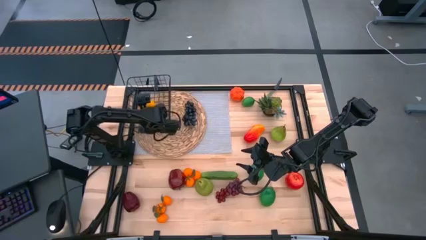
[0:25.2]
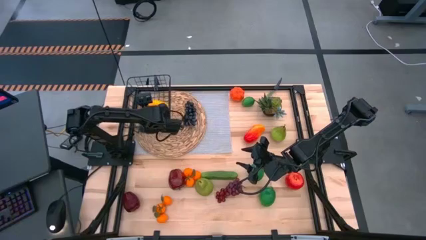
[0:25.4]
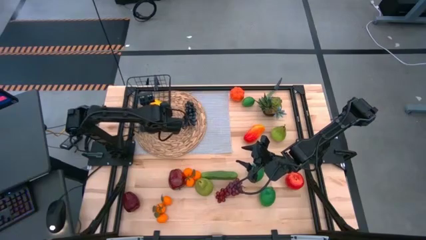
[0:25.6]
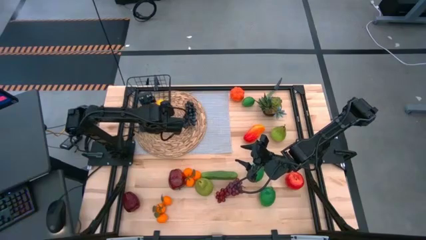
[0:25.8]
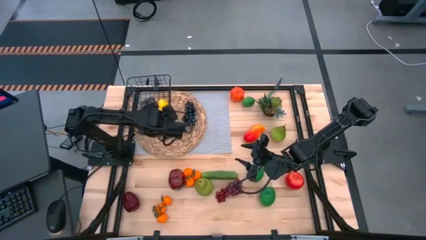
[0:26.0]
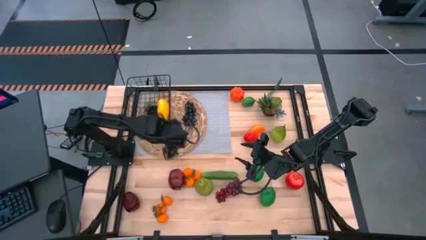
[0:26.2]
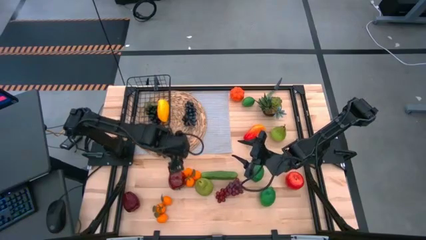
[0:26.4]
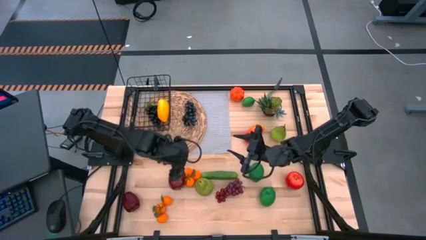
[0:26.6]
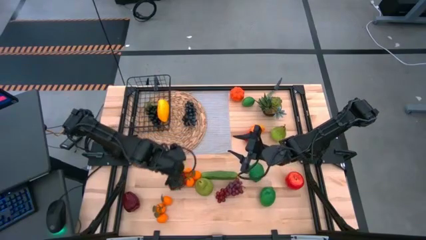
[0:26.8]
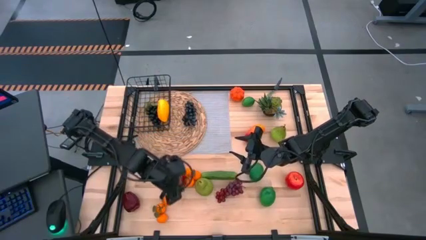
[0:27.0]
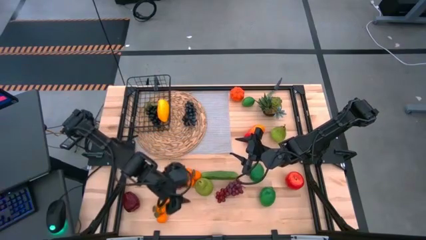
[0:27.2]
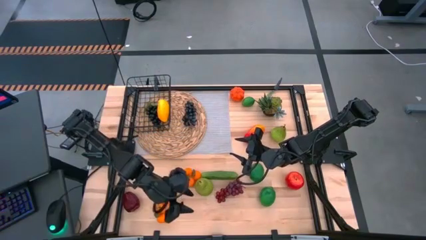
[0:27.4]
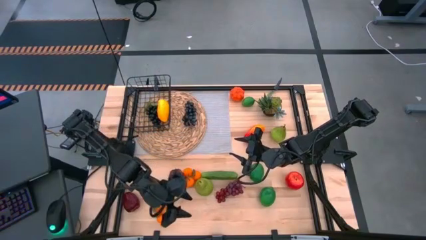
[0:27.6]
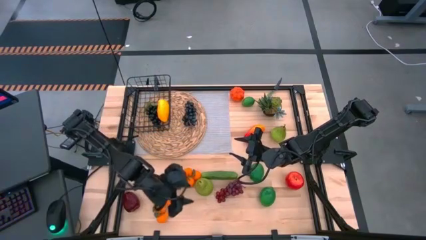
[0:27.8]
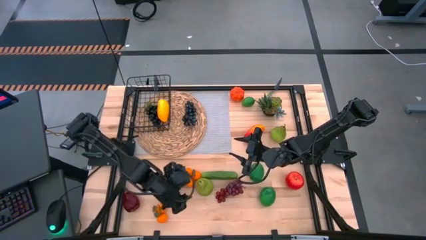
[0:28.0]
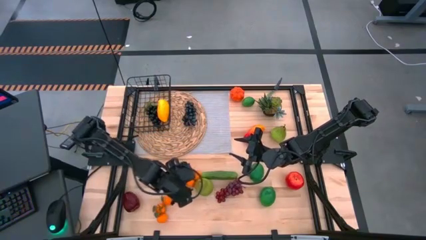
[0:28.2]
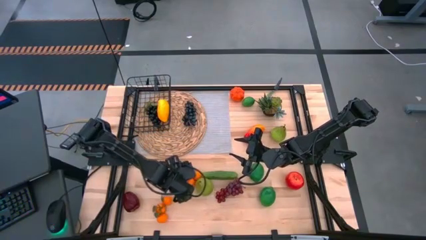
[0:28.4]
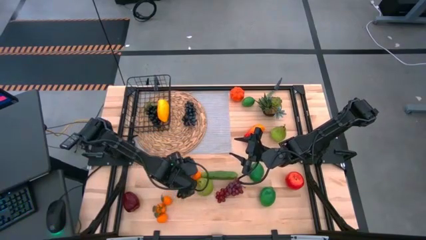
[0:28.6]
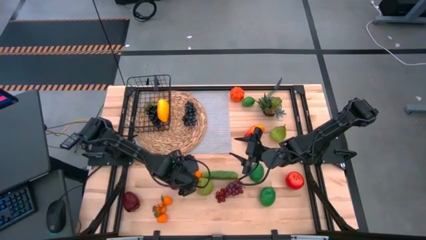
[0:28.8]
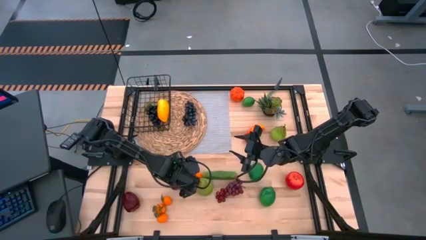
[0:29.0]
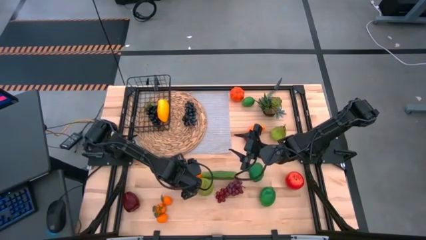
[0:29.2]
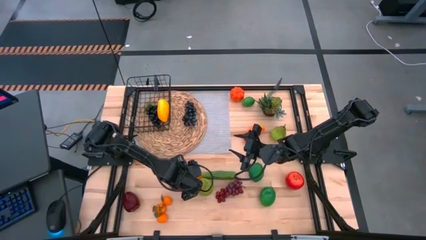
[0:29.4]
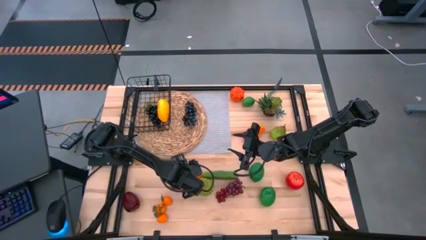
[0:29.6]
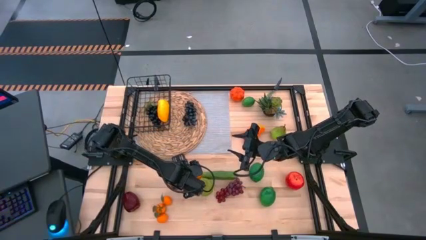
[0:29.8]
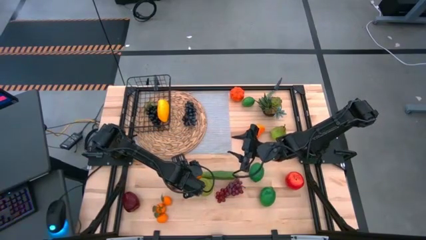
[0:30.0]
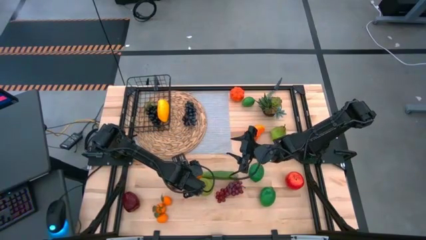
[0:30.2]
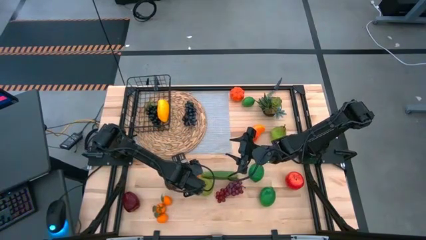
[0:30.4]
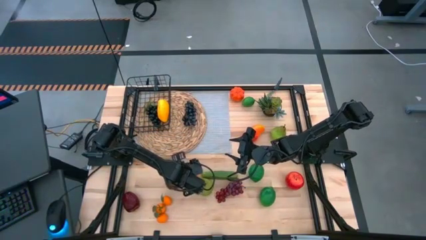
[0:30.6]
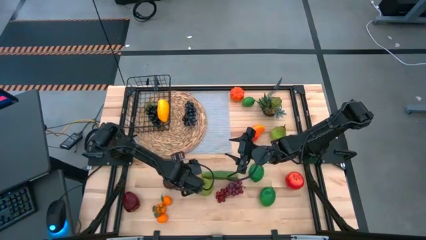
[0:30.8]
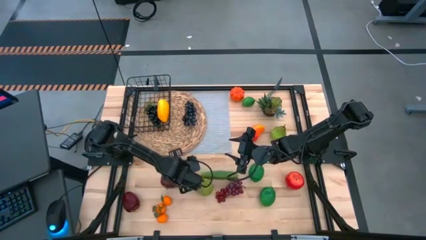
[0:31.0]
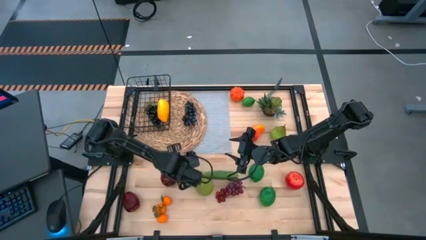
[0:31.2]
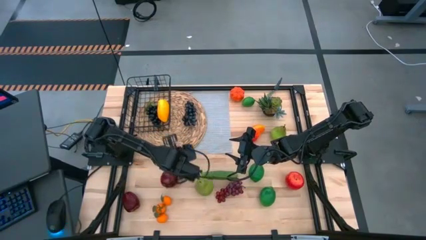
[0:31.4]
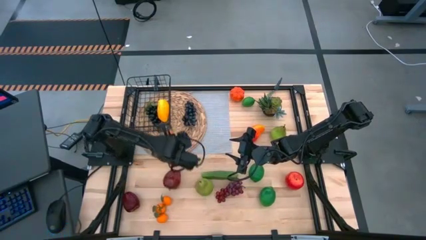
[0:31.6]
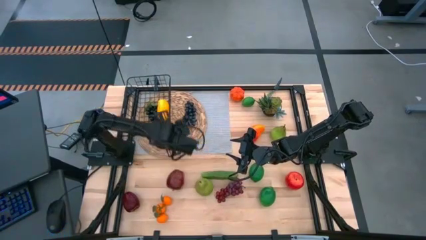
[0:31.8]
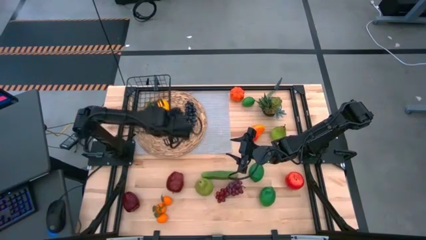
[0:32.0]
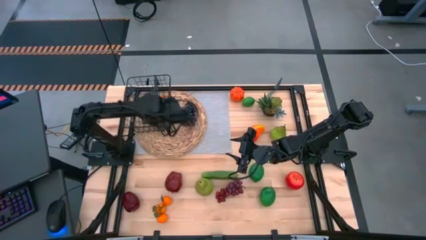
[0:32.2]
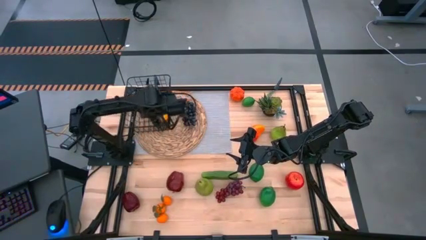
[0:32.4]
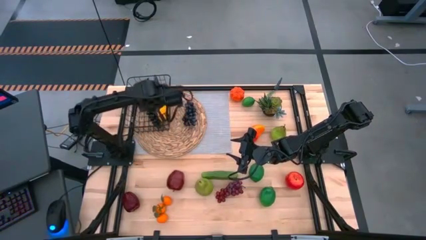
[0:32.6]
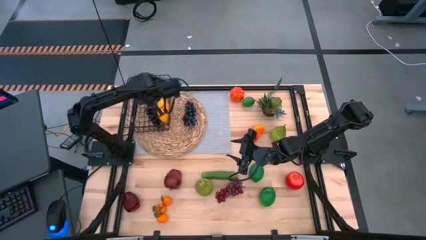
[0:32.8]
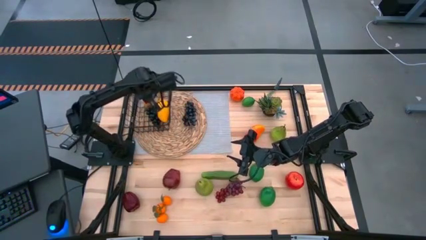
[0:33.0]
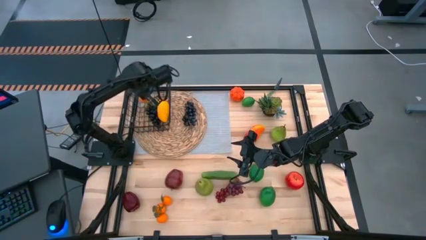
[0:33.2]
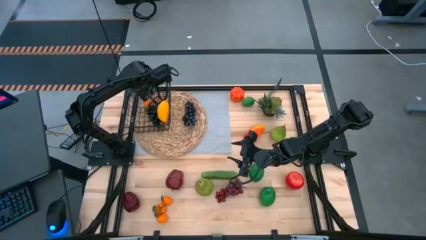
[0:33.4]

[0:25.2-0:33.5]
Task: Build produce basket
Put the top orange tangerine into the wire basket

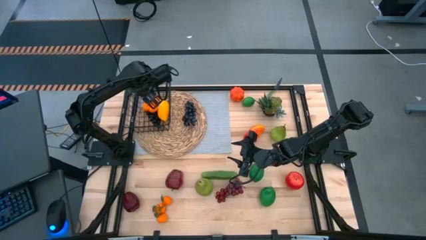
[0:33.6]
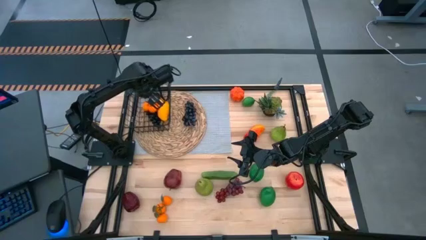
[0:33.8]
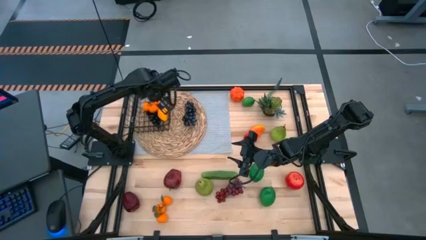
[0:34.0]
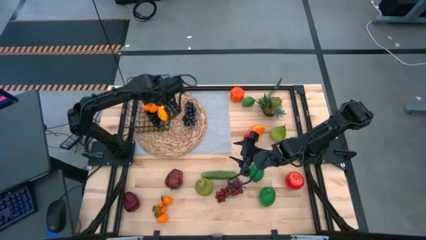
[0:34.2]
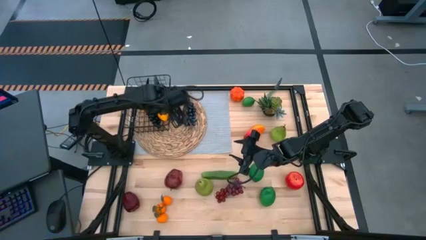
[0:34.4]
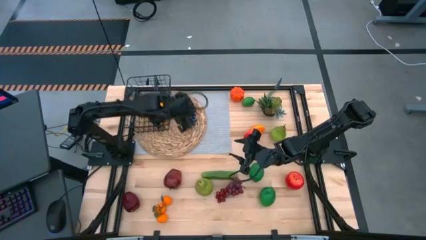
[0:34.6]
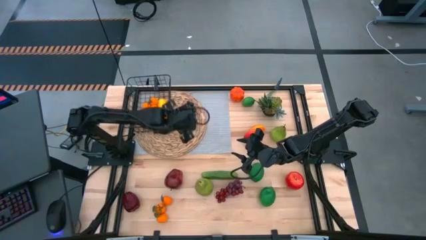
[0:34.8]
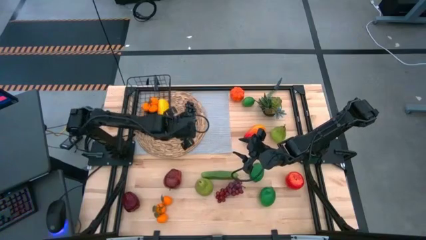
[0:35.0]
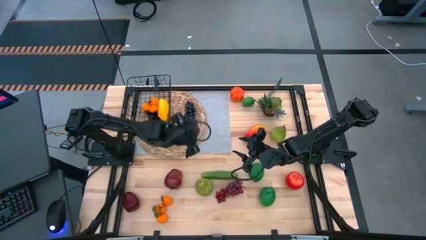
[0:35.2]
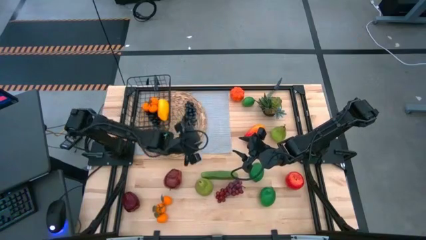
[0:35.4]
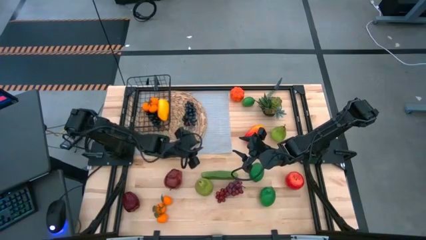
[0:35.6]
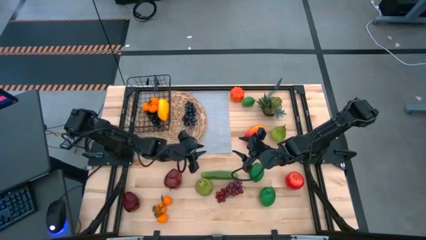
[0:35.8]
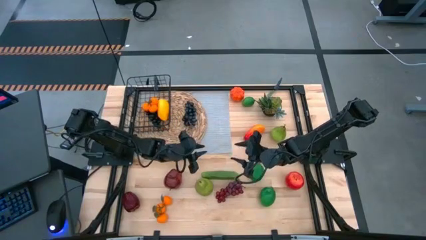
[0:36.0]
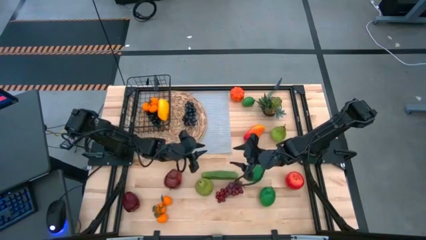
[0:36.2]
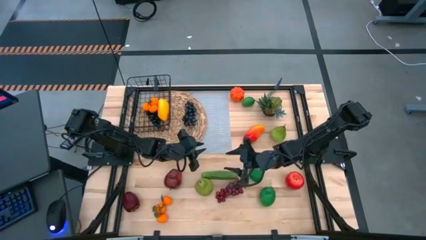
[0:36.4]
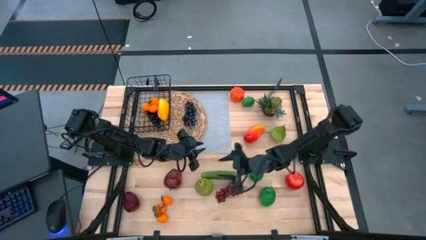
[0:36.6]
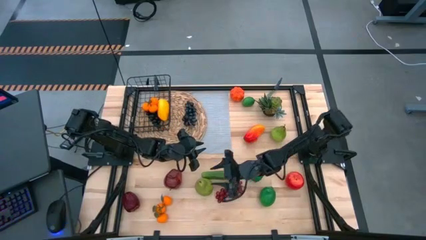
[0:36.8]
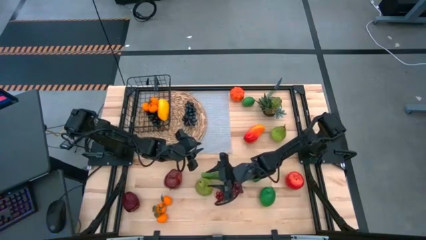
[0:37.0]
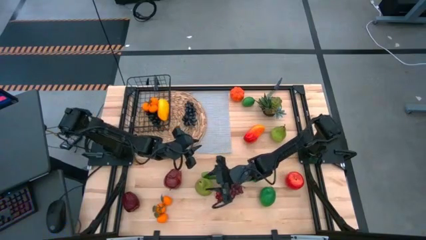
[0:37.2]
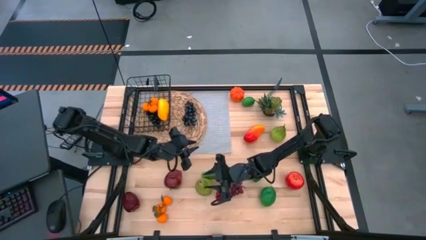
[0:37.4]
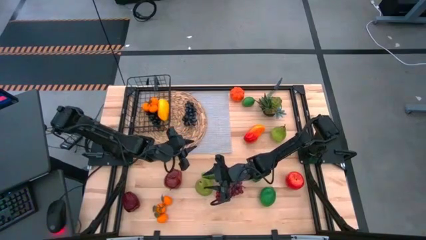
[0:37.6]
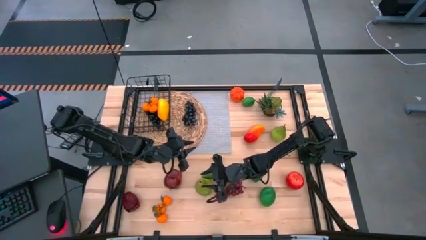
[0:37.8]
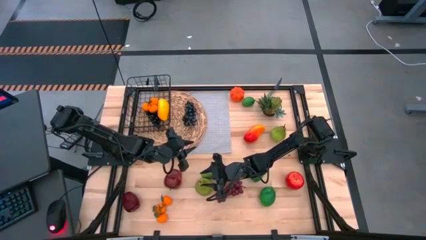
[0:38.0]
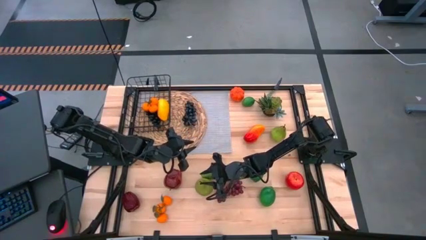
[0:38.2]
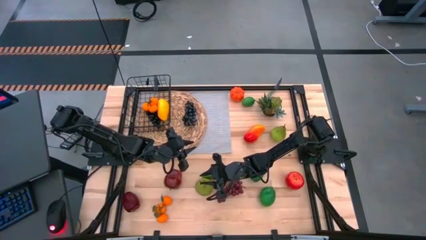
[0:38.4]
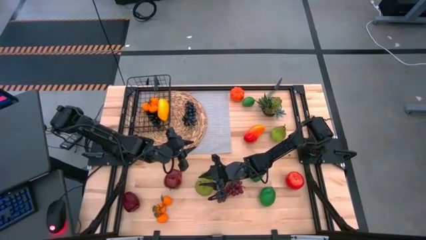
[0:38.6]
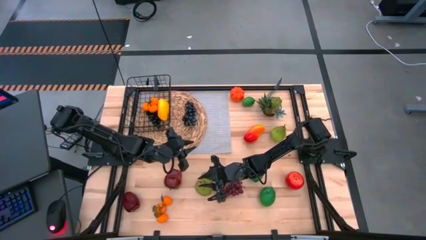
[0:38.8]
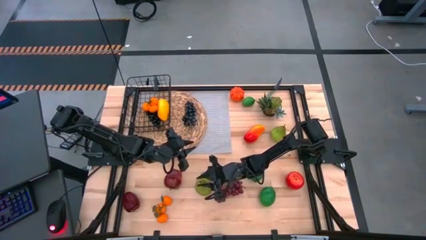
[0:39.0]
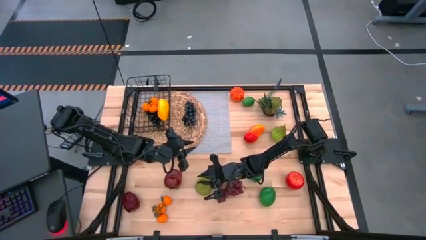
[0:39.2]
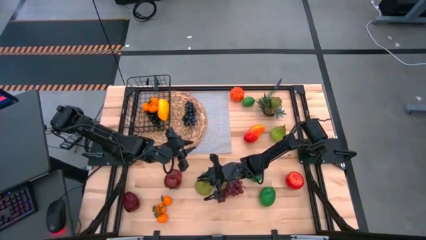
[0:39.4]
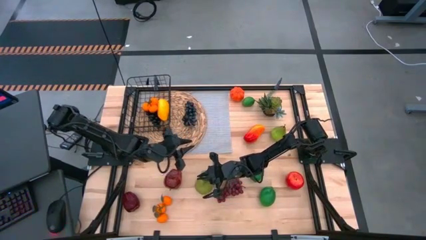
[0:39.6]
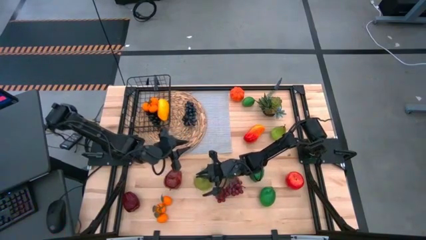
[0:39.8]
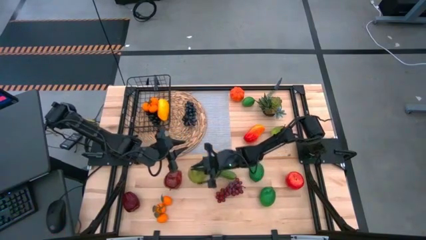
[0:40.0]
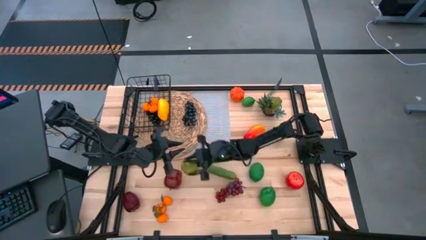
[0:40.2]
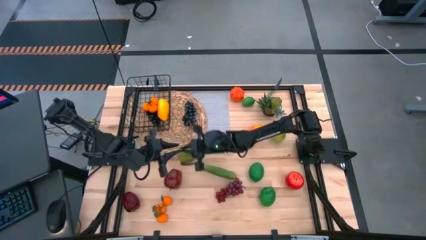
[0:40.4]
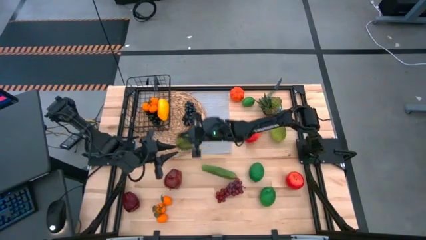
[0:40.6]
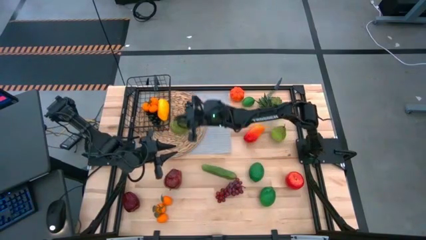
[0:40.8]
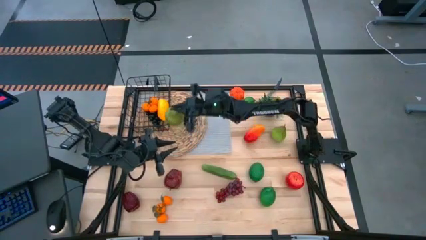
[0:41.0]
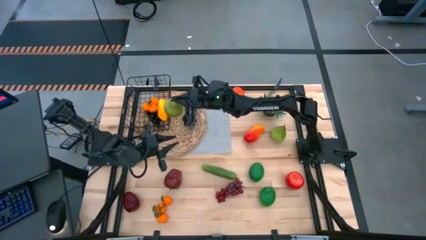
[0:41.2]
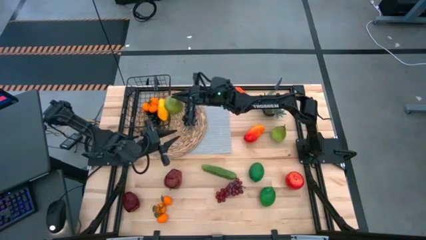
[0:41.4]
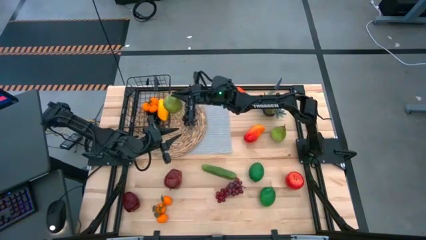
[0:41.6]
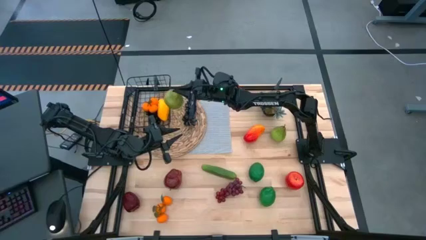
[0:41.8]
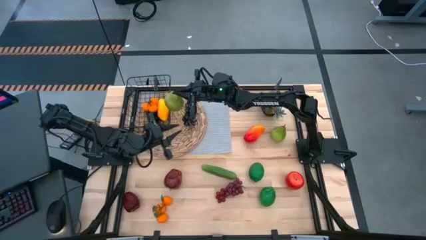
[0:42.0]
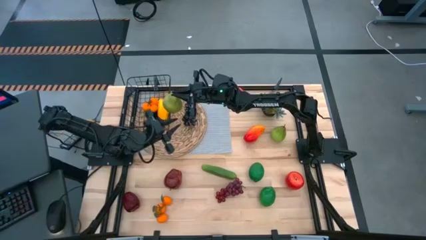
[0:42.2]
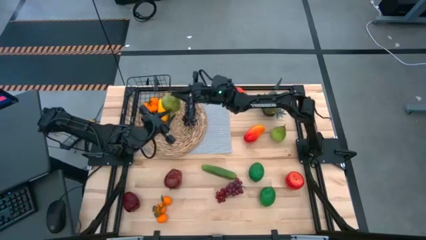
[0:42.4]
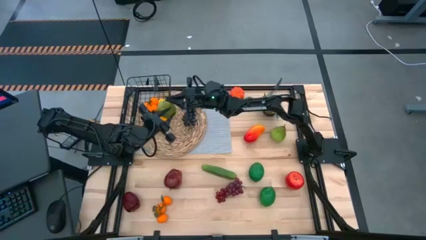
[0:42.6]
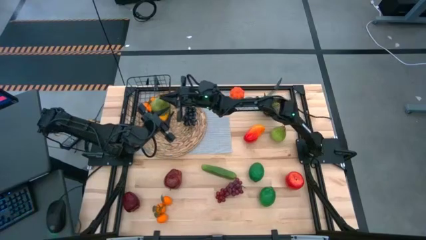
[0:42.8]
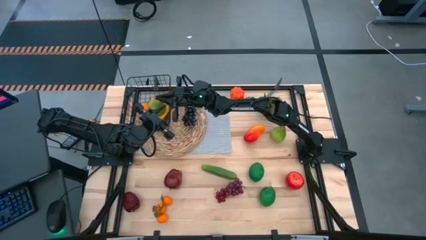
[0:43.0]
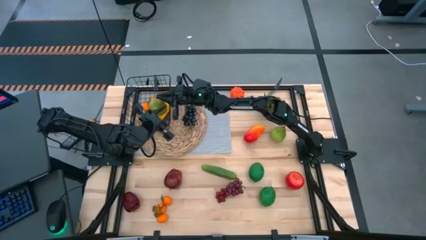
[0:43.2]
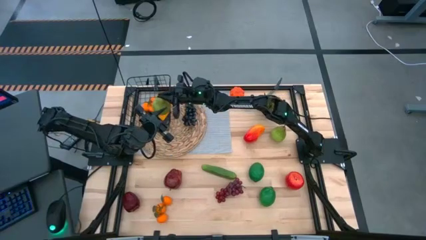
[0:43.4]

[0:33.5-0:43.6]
Put the bottom green pear into the wire basket
